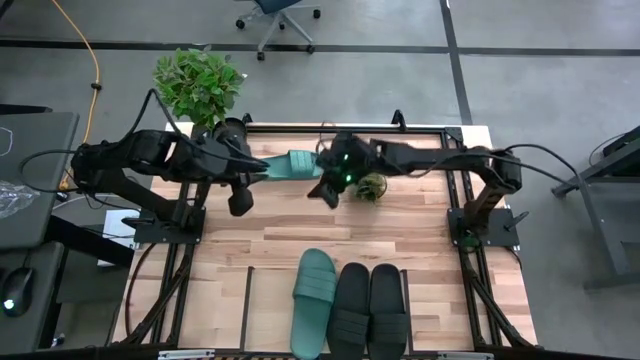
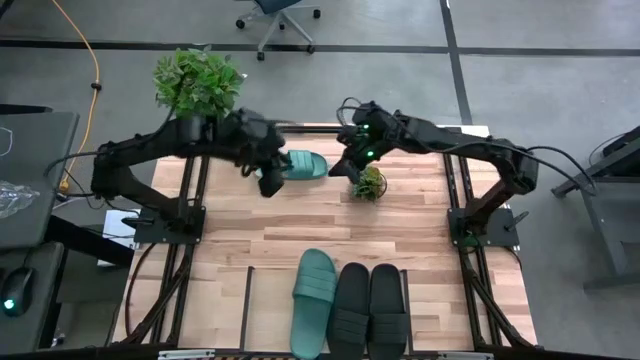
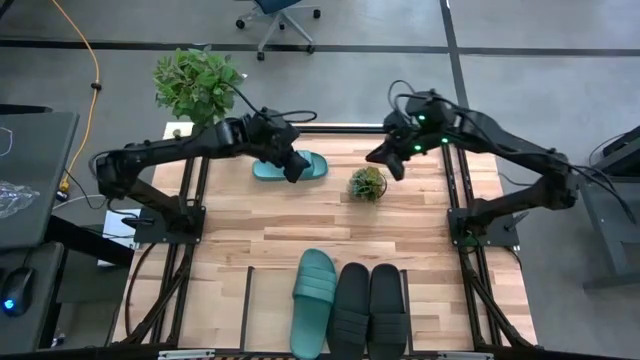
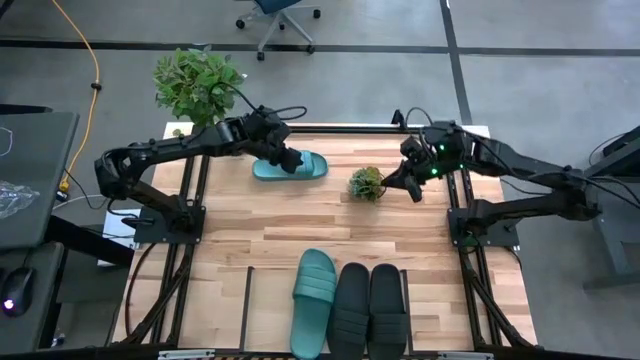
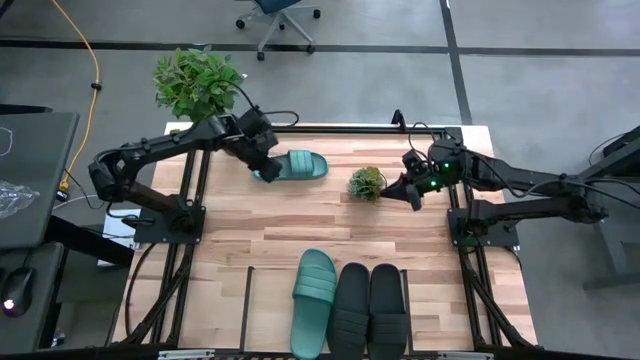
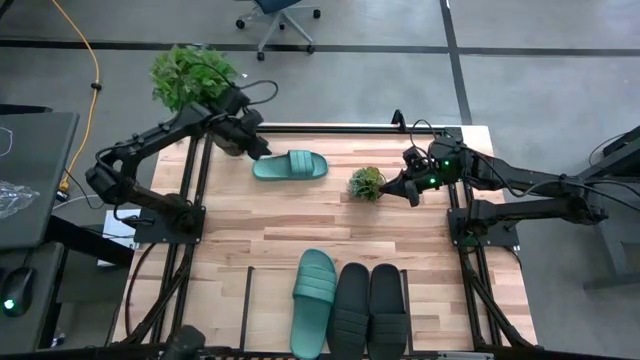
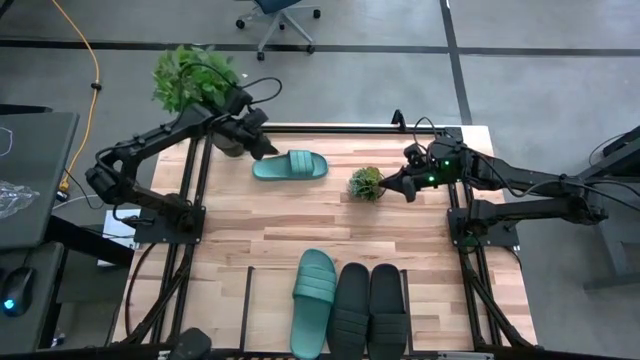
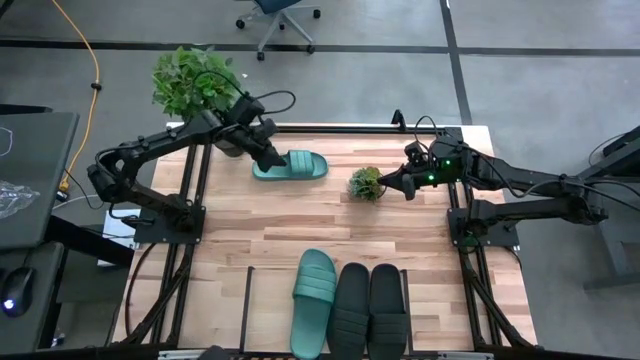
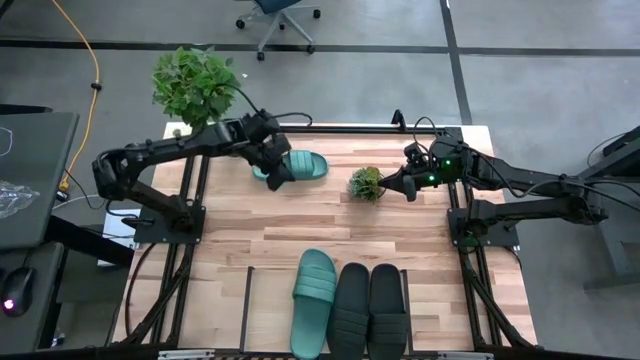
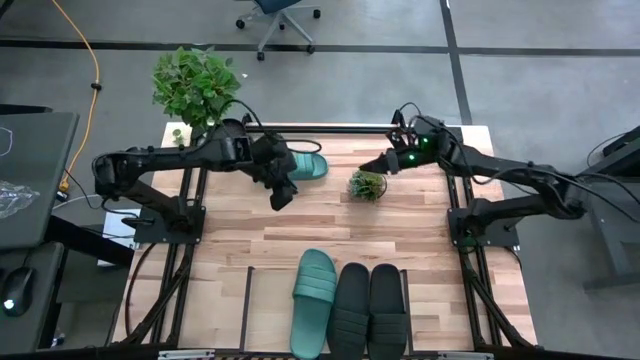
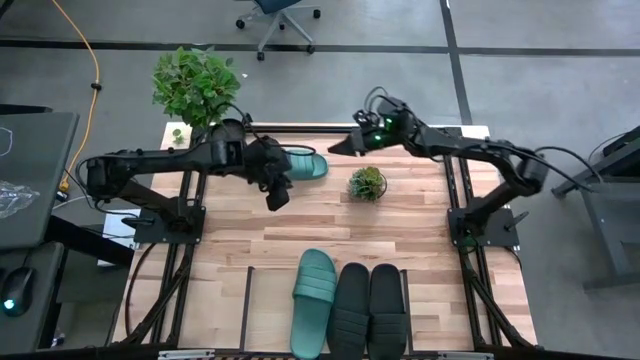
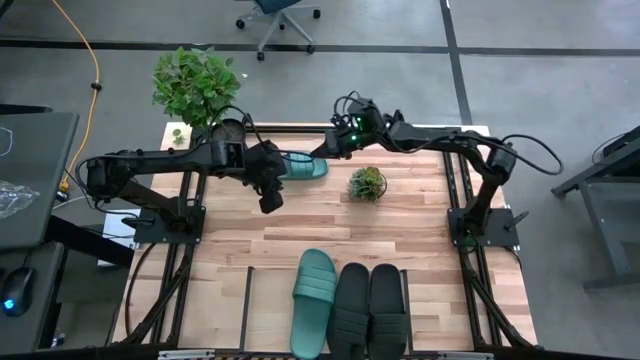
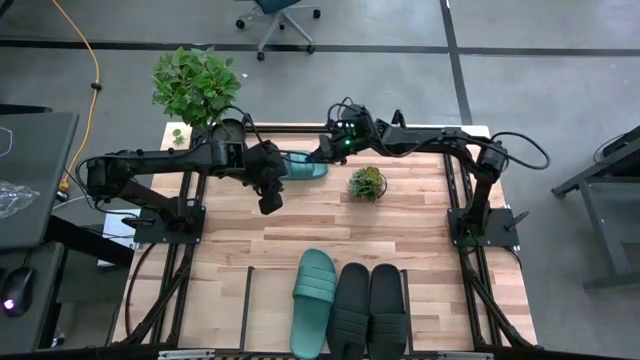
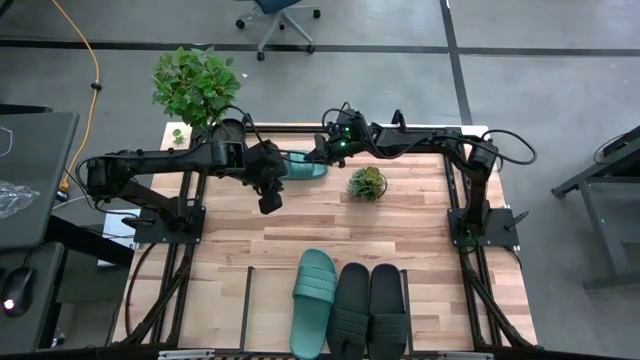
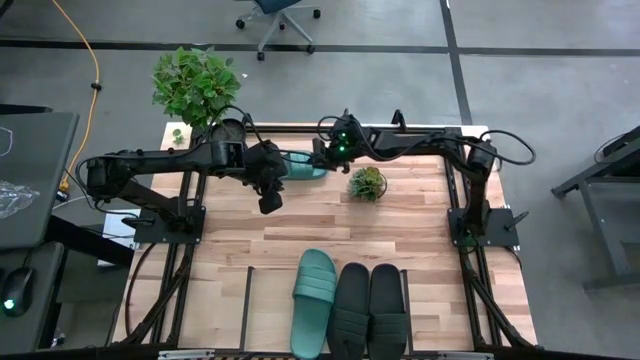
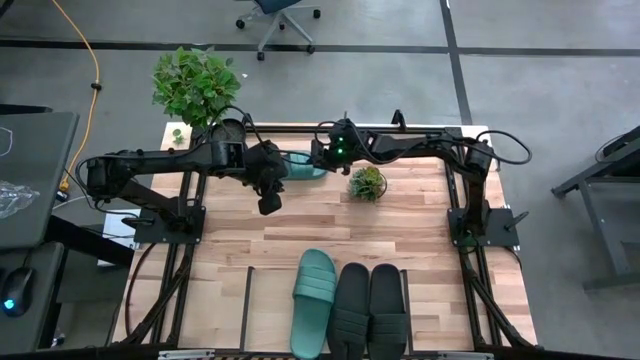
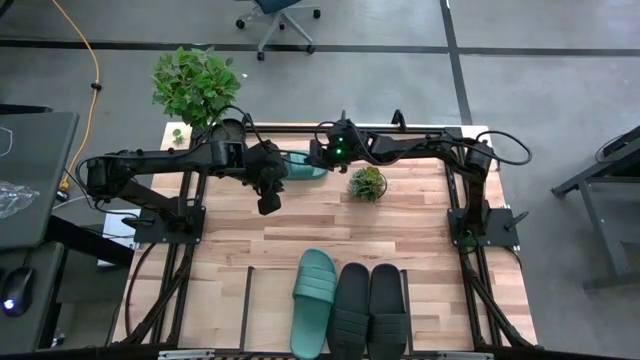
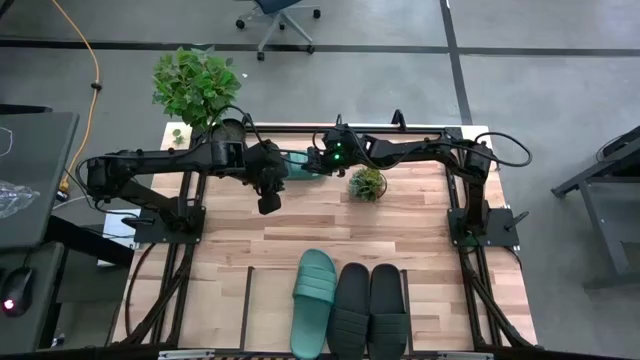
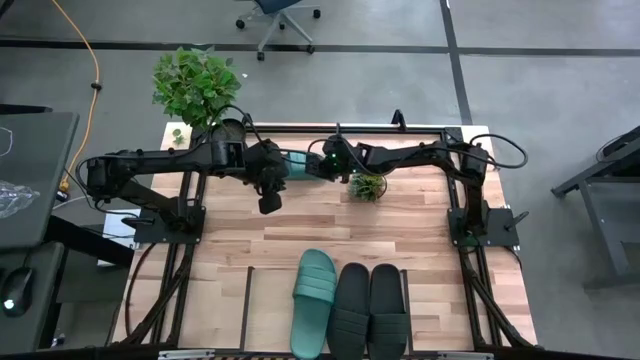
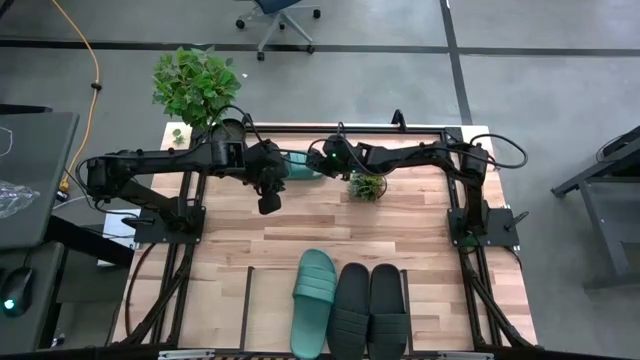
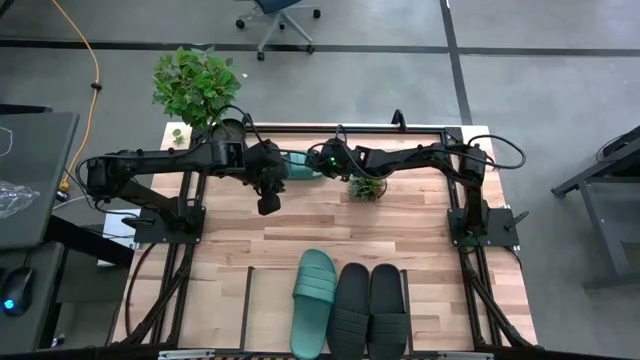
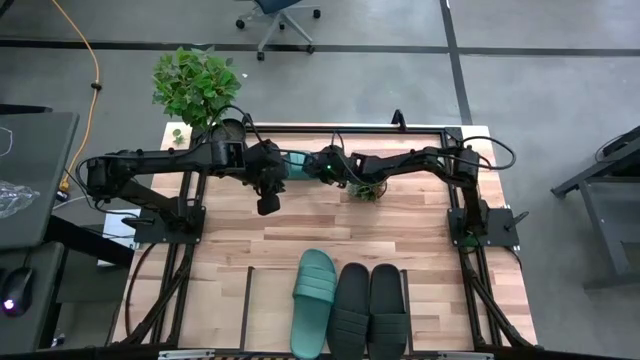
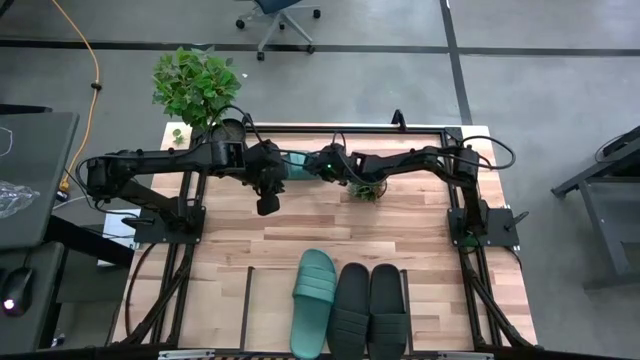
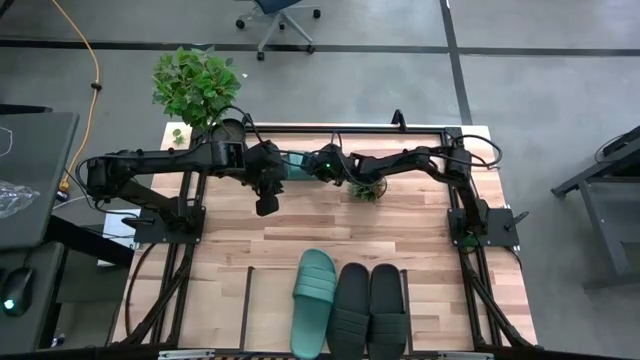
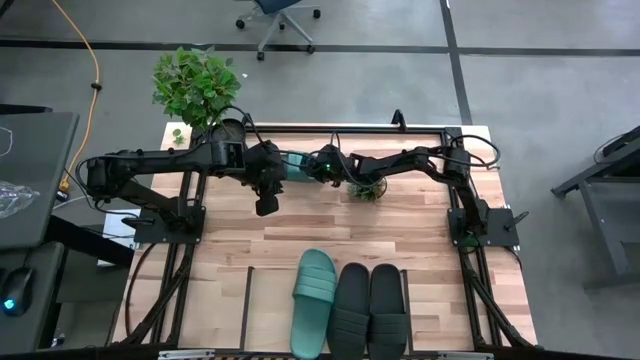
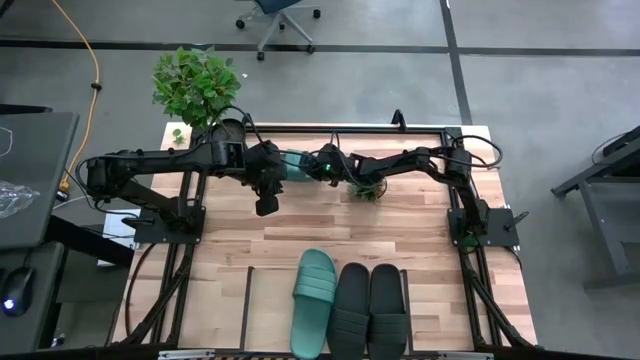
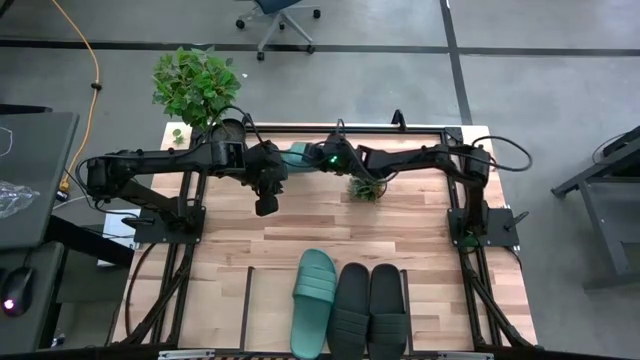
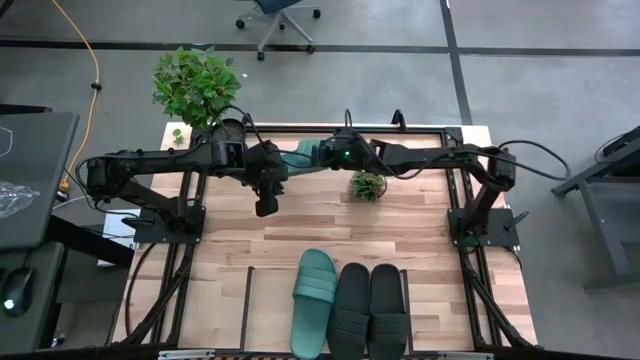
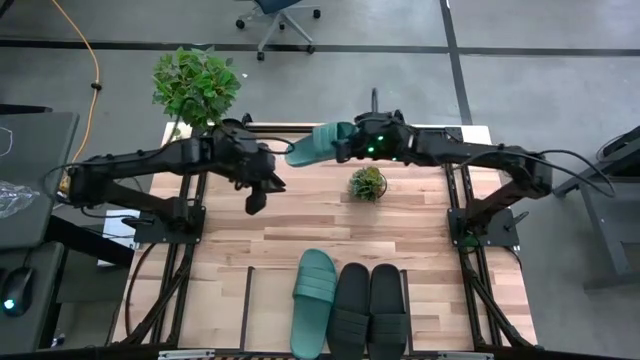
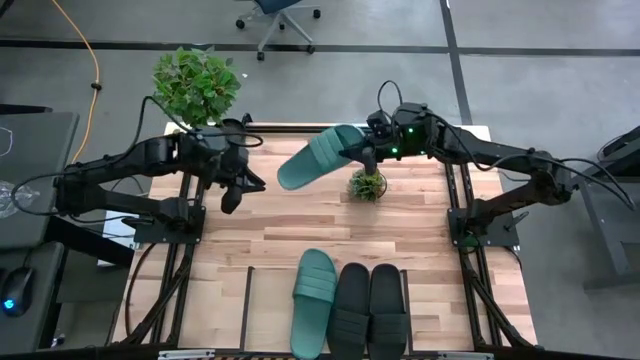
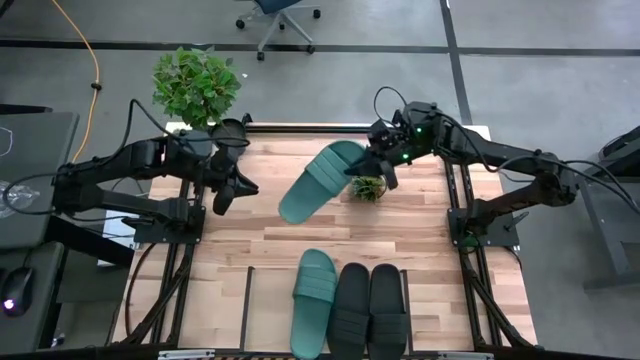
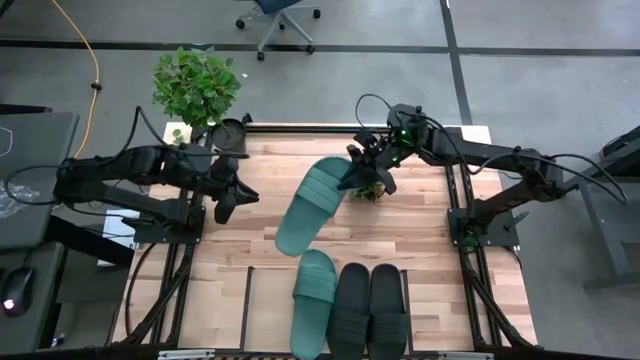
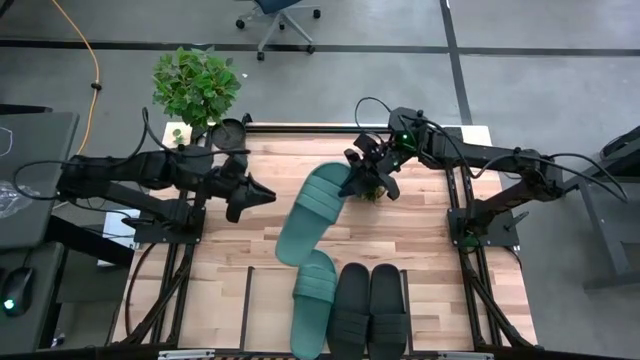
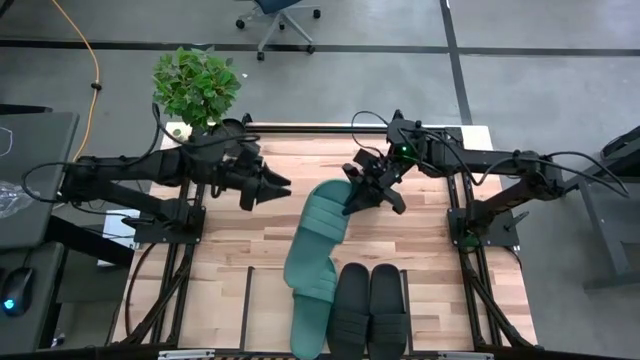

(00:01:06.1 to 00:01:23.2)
Task: Pick and place slides into the shelf
Put the blue slide on the shelf
